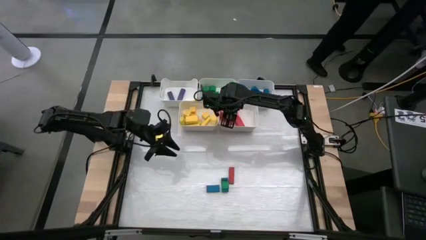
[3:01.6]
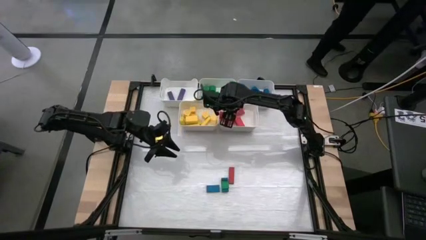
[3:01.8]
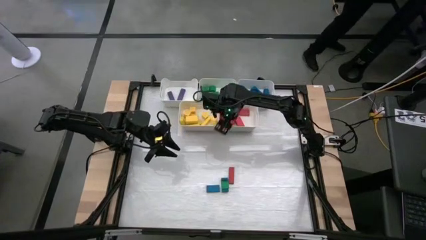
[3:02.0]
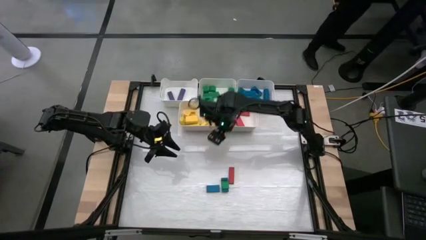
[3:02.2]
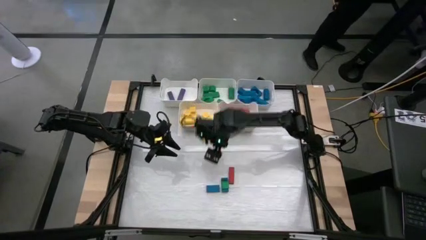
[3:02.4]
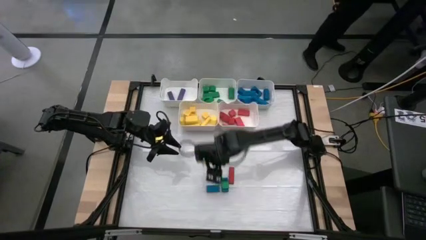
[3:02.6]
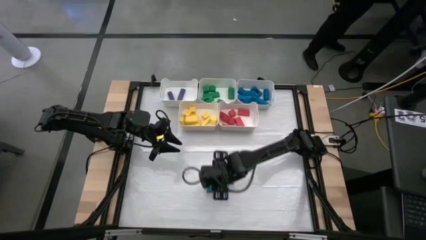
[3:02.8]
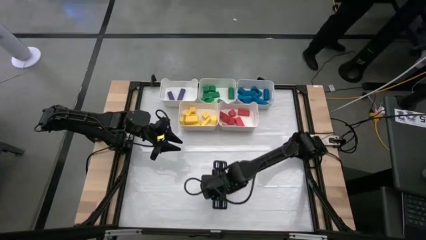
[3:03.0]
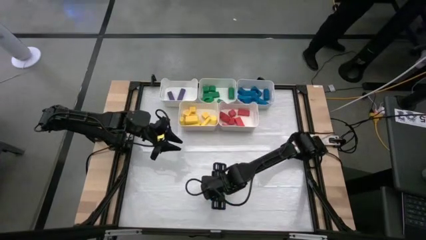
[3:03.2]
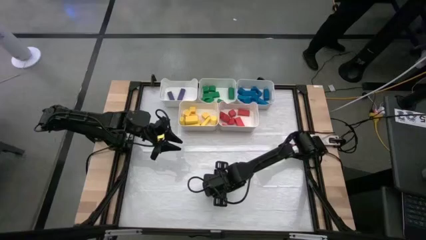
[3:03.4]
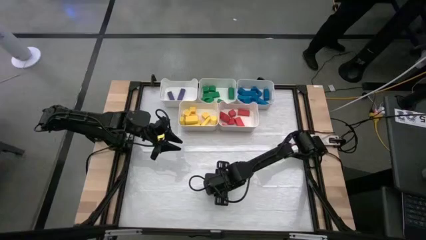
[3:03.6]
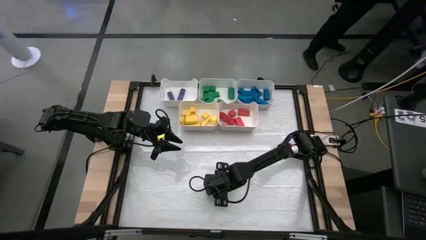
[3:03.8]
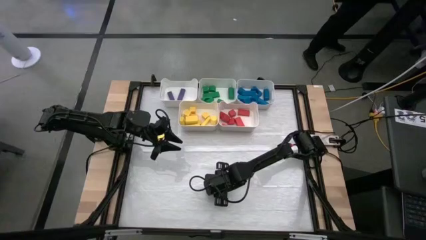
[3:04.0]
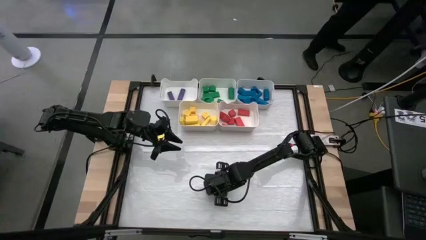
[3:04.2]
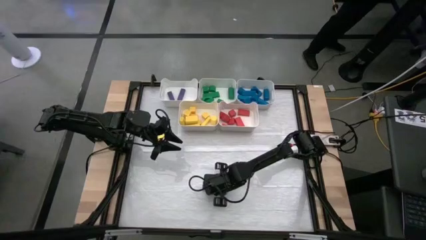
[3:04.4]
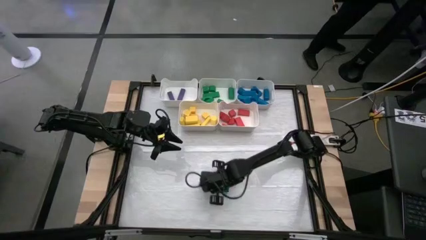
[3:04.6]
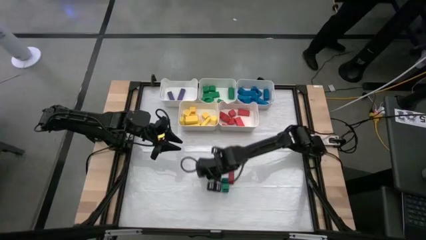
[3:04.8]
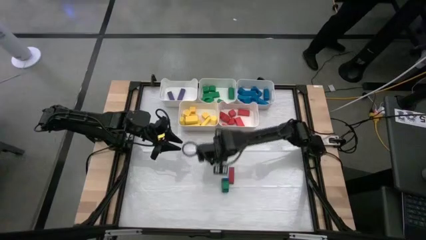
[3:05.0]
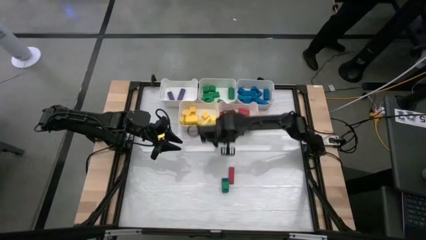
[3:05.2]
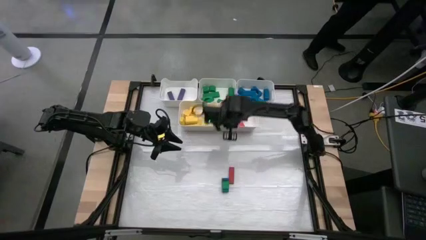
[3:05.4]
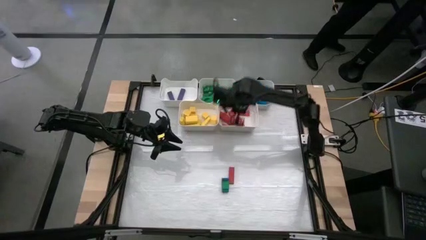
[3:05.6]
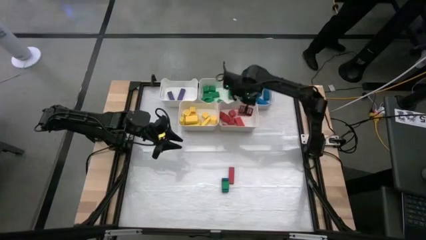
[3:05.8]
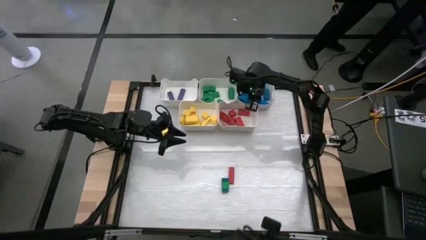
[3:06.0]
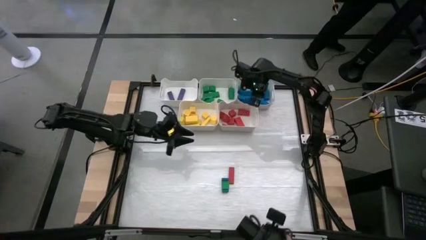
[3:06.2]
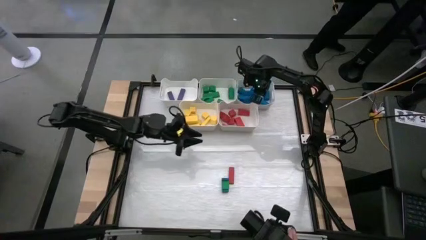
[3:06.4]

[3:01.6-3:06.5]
Task: Sort blocks
Put the blue block into the top right bin

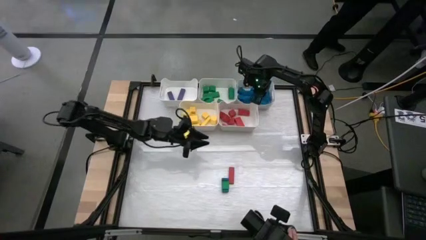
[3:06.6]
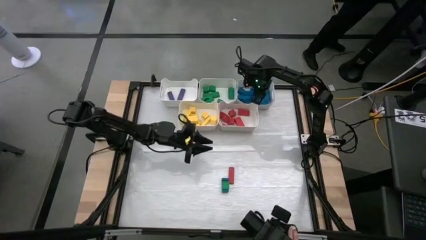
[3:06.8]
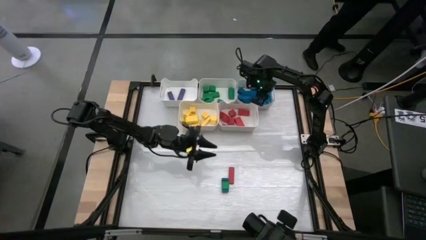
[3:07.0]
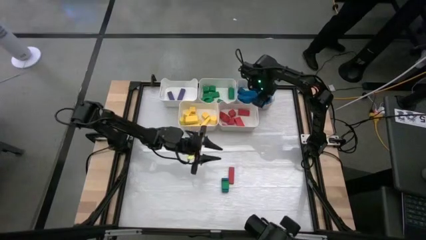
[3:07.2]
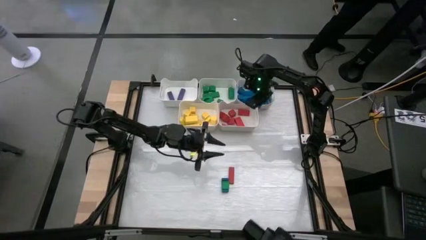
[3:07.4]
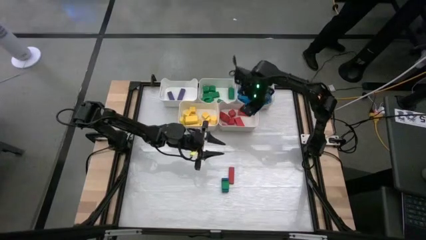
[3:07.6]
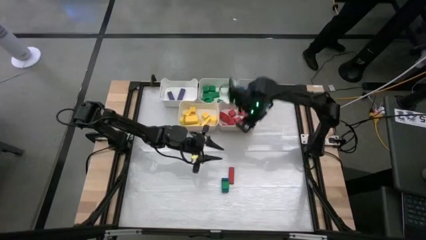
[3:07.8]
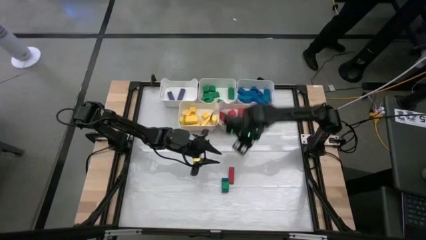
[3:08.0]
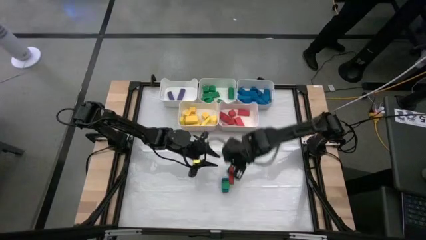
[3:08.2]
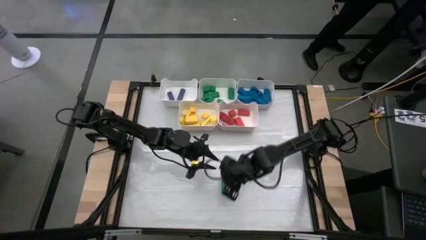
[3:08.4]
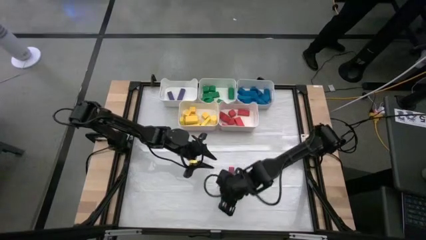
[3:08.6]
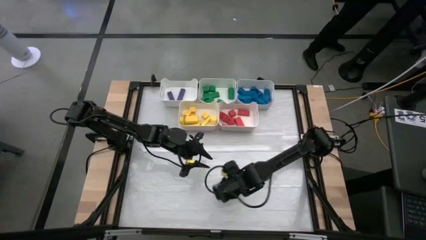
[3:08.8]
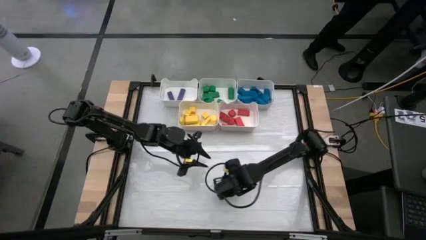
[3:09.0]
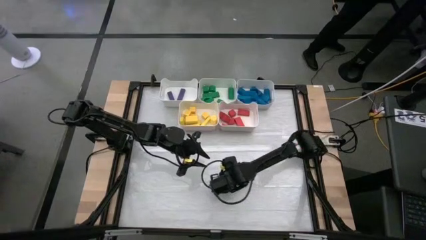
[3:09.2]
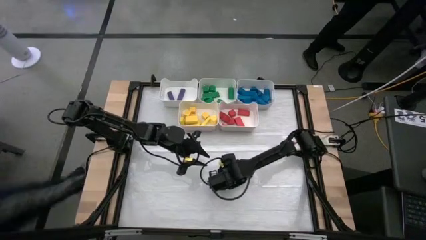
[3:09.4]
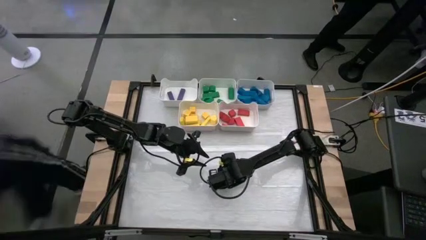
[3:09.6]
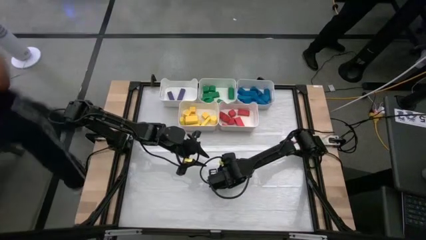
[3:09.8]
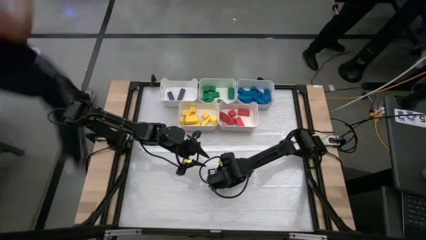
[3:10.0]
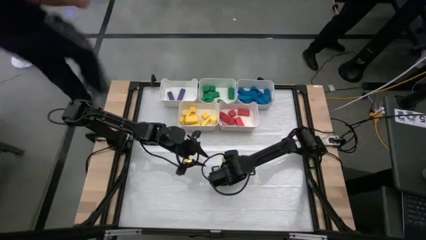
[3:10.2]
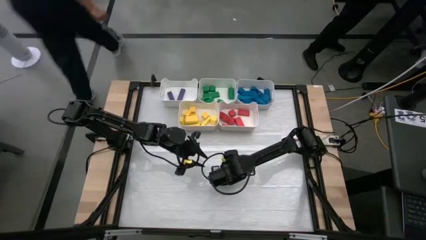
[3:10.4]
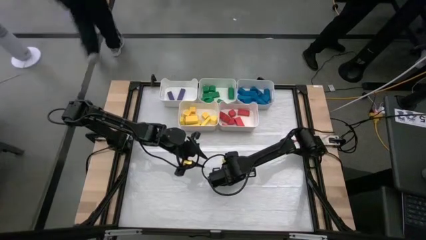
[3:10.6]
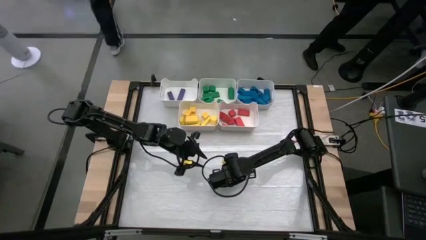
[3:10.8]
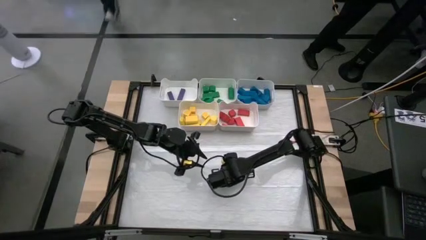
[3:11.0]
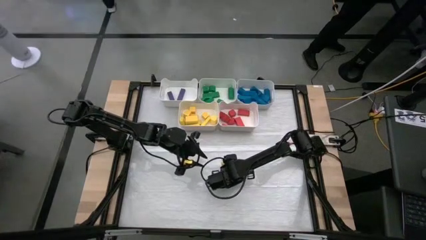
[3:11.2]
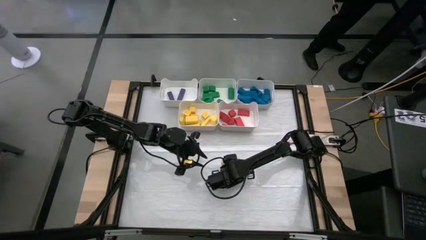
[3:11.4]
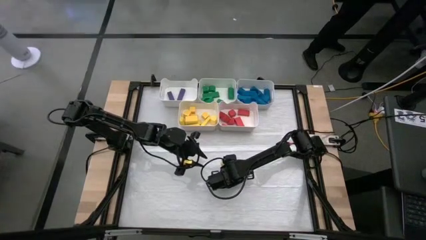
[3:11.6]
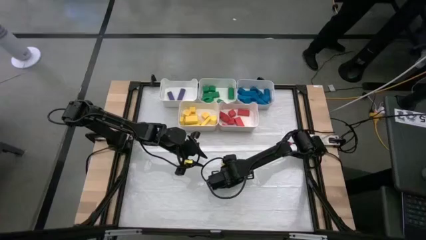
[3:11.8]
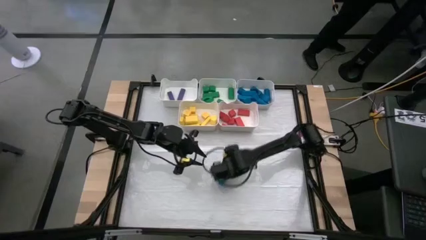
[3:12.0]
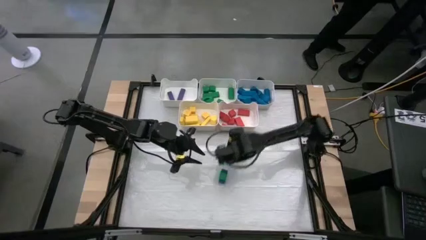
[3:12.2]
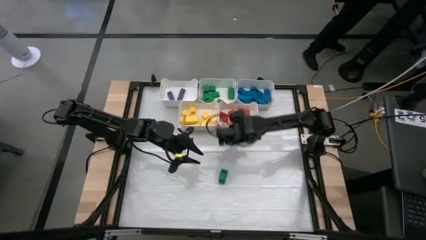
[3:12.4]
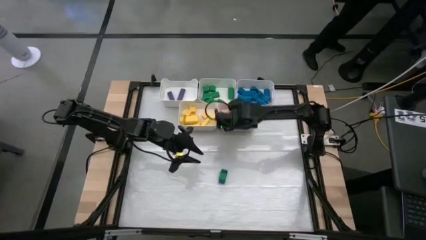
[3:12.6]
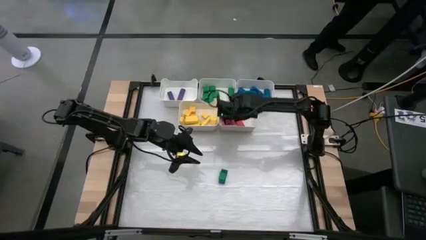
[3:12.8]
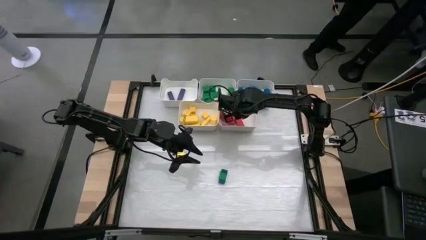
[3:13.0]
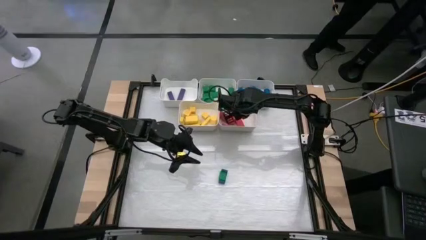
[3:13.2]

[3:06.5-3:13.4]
Put the red block into the bottom right bin

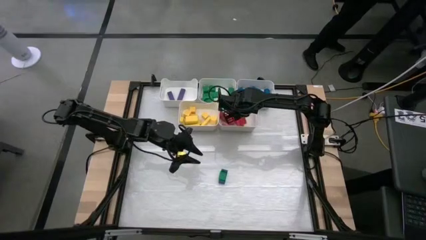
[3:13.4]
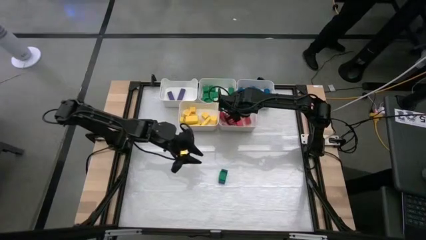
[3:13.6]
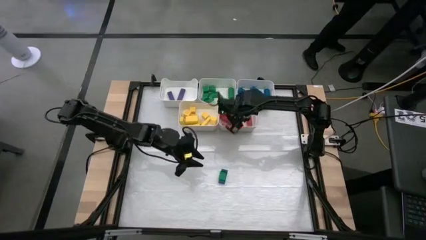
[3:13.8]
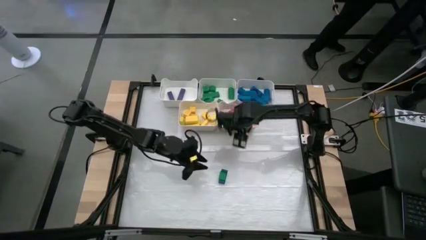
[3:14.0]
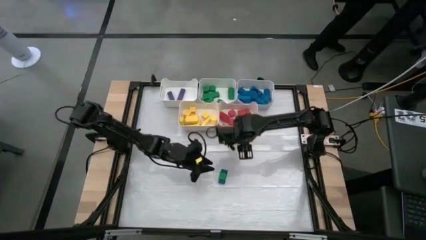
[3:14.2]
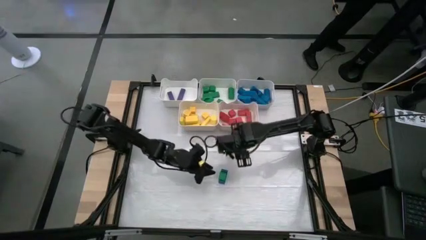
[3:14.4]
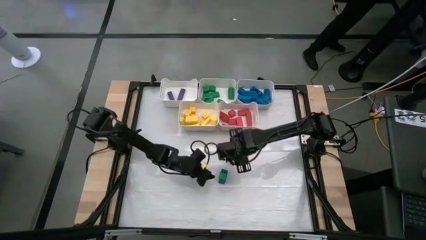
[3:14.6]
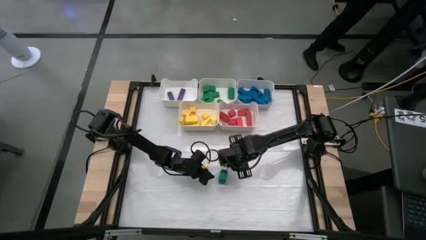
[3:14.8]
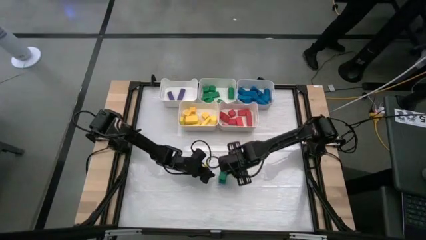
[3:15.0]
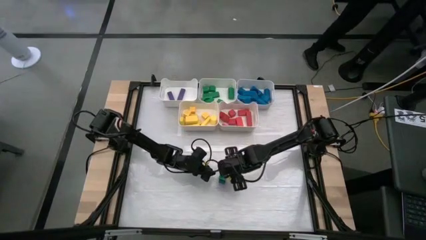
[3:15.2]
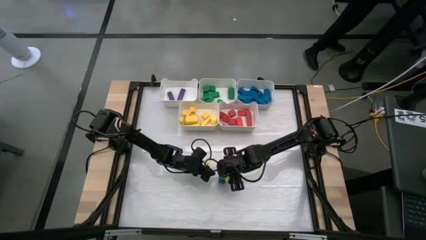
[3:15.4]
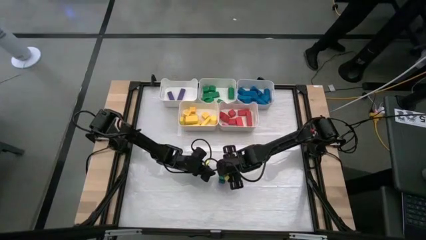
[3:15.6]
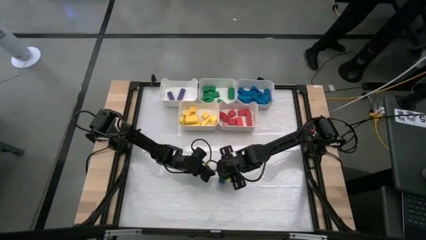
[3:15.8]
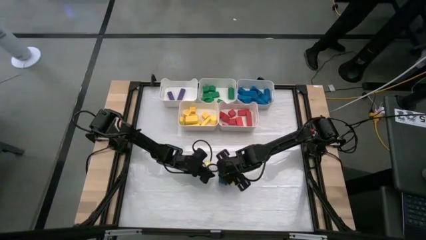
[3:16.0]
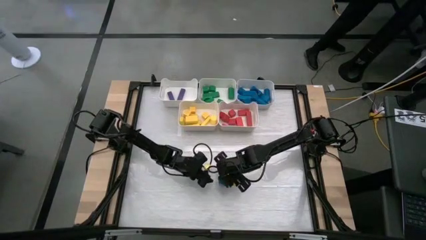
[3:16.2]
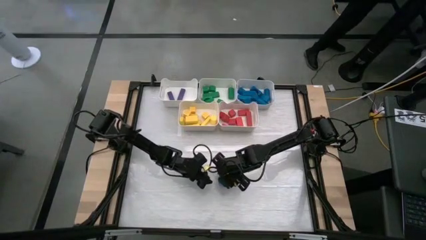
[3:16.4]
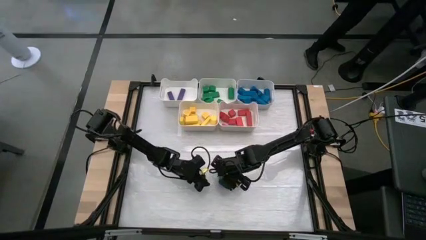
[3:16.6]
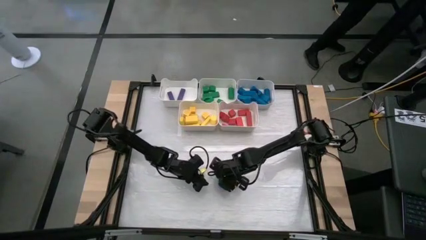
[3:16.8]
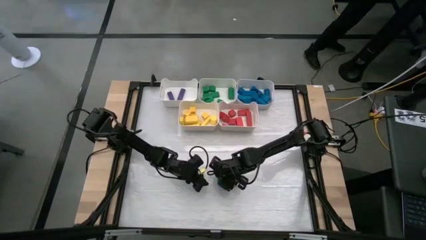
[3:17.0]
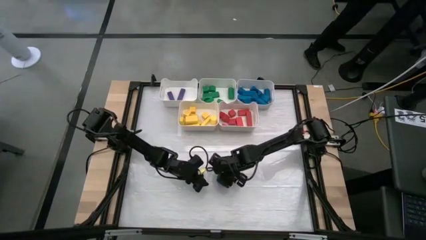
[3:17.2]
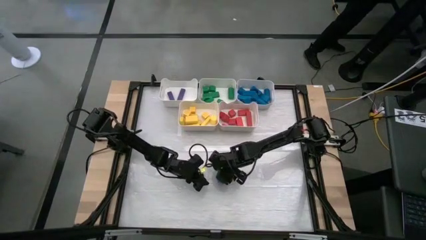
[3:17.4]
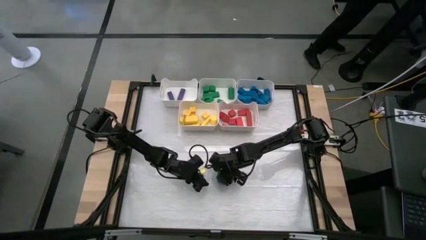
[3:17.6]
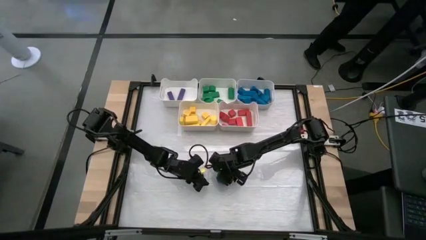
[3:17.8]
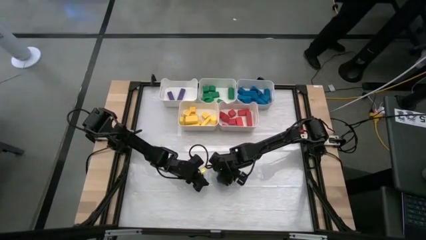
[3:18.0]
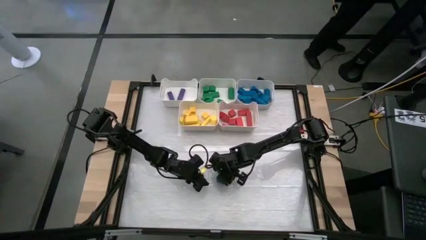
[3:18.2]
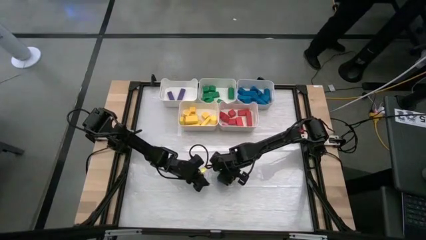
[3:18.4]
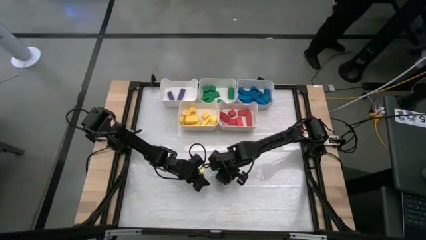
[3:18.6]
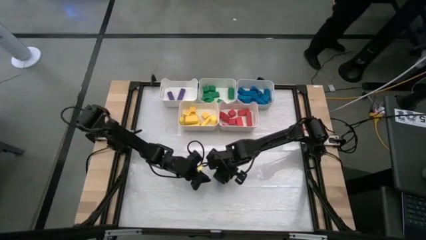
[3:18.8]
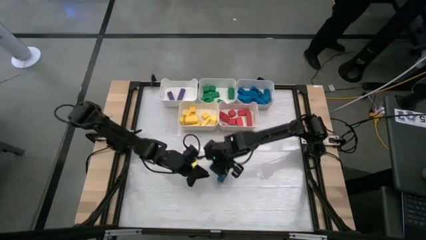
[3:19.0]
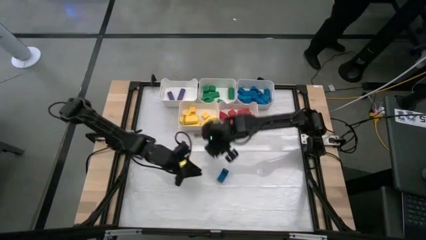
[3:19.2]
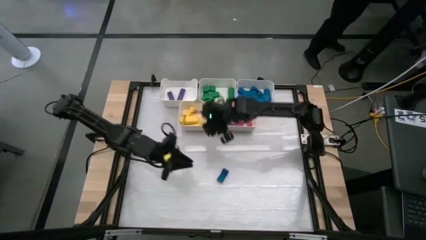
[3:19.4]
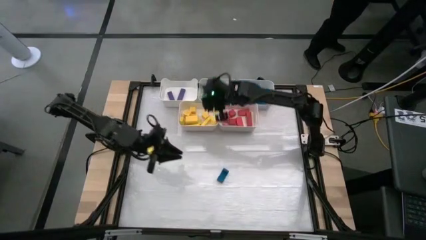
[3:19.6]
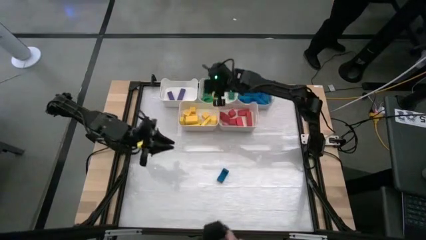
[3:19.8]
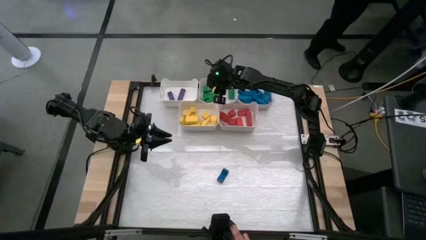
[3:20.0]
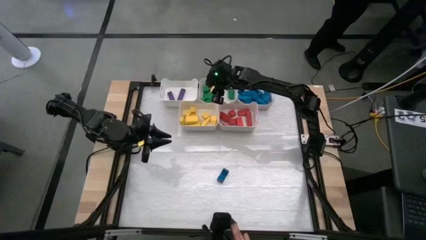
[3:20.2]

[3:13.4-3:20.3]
Put the green block into the top center bin
